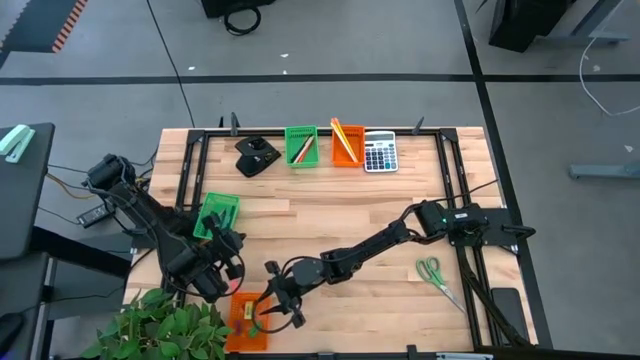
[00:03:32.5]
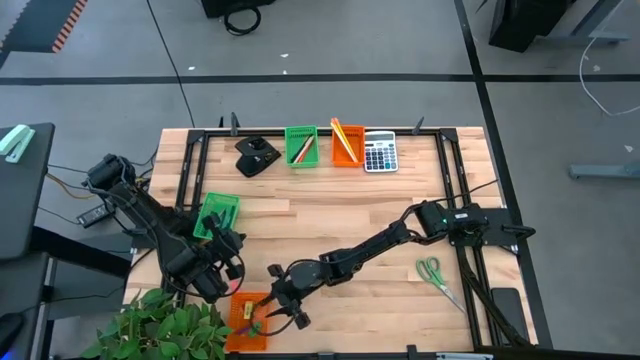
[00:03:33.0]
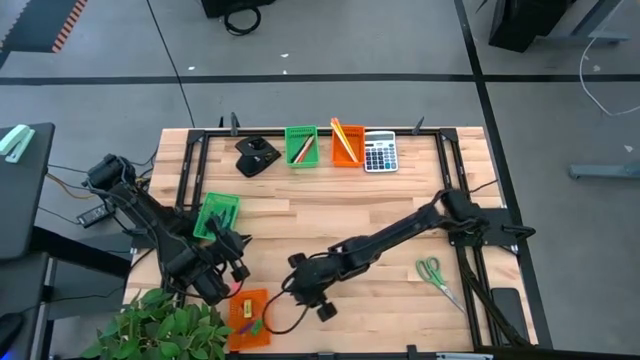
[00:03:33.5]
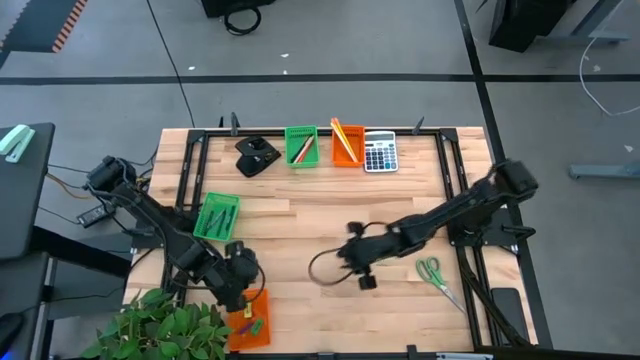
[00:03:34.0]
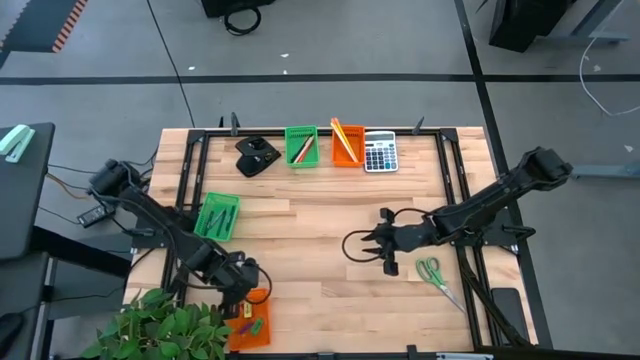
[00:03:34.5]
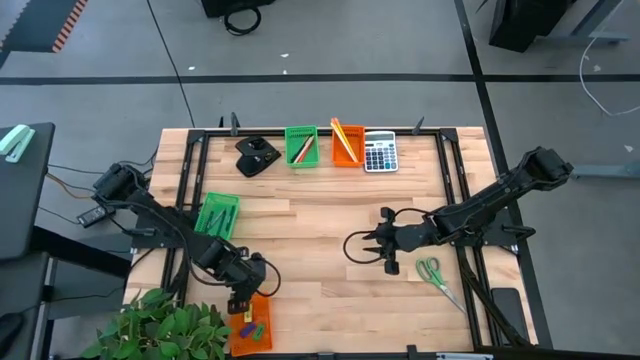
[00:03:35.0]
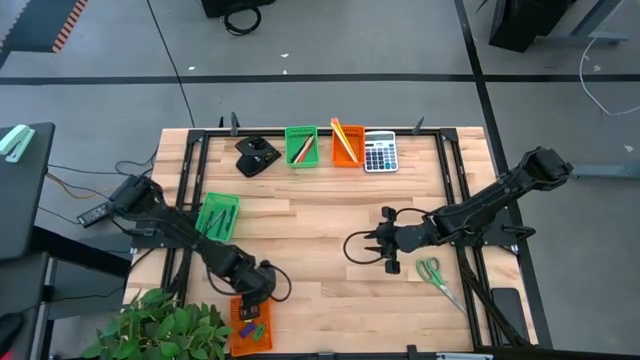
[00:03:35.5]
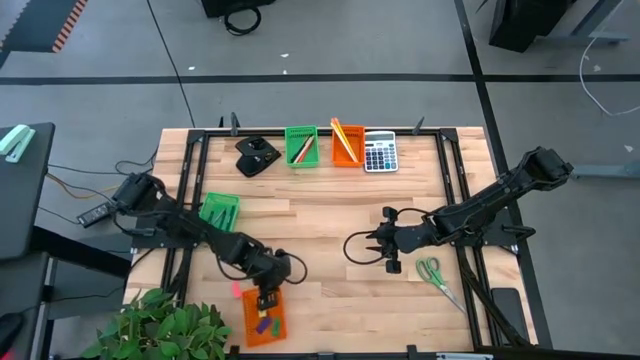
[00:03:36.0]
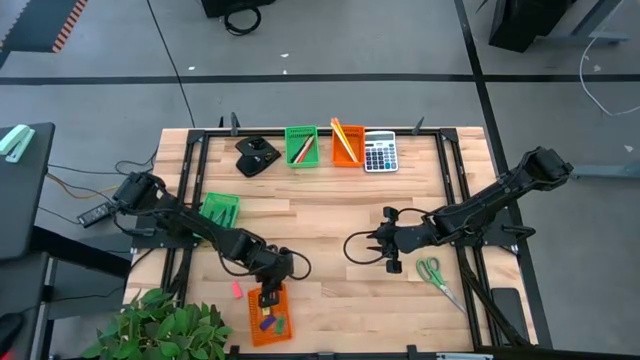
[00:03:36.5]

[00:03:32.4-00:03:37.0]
Task: Sort crayons/erasers/pens/pencils in bins
Adjust the bottom orange bin

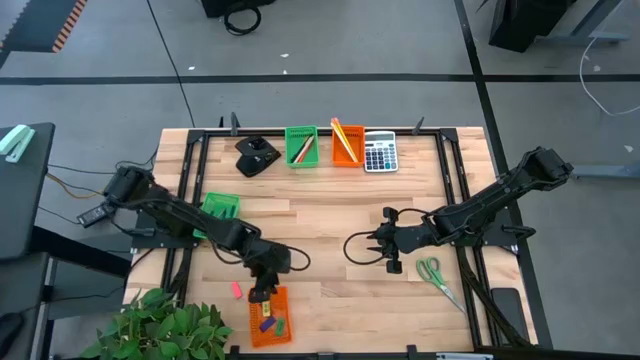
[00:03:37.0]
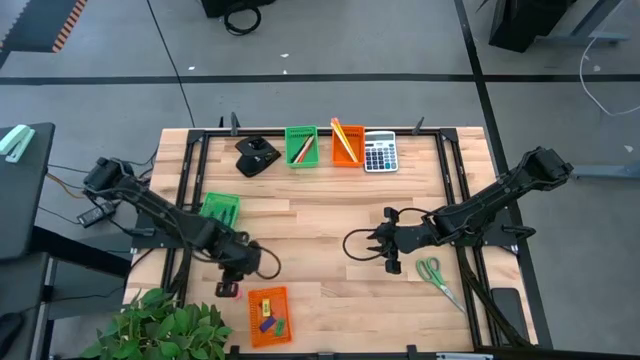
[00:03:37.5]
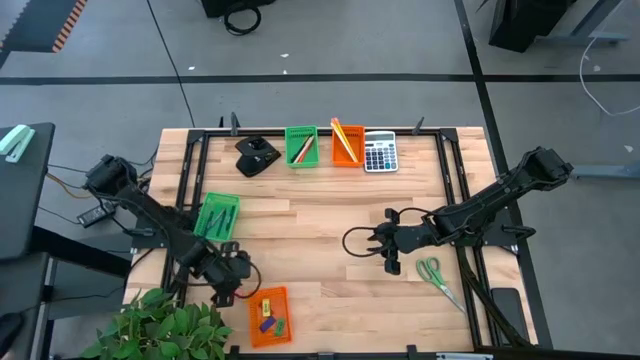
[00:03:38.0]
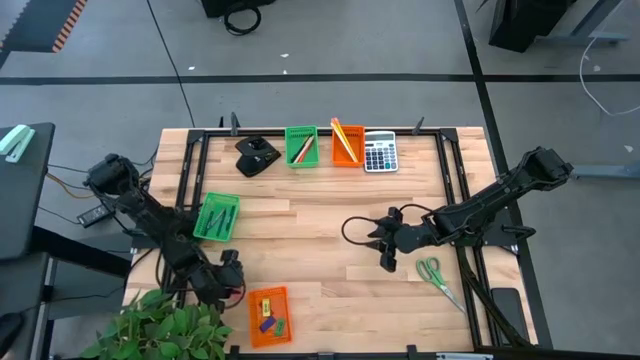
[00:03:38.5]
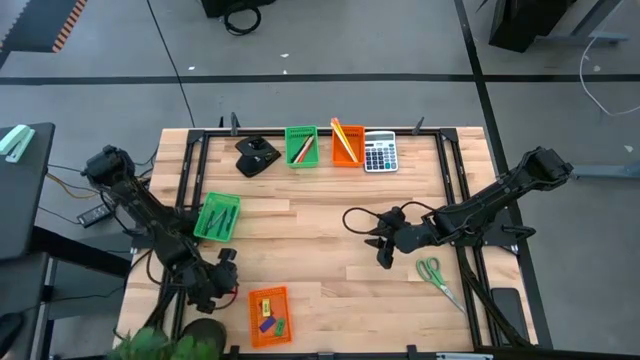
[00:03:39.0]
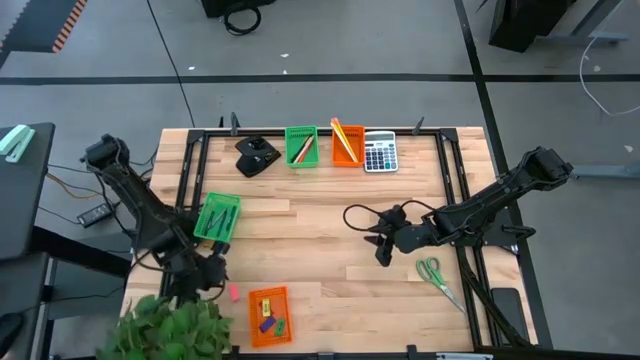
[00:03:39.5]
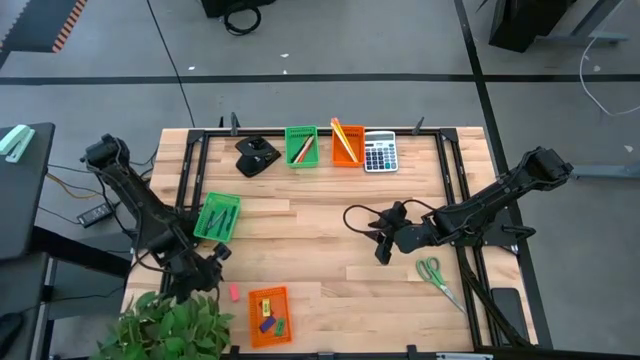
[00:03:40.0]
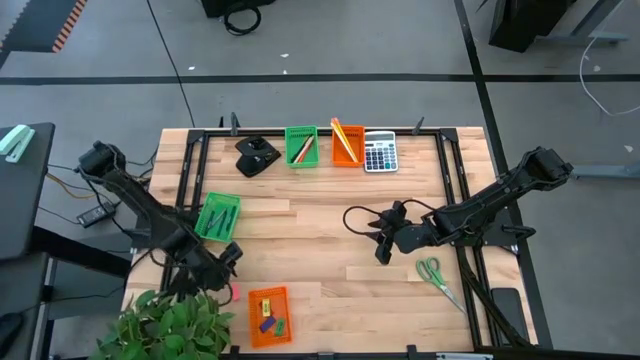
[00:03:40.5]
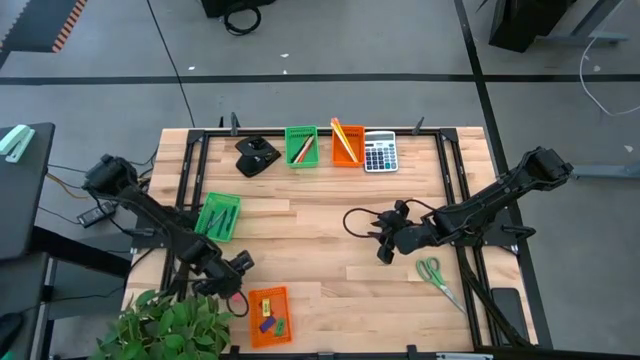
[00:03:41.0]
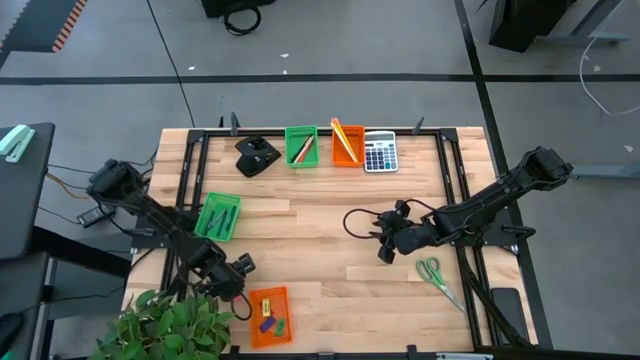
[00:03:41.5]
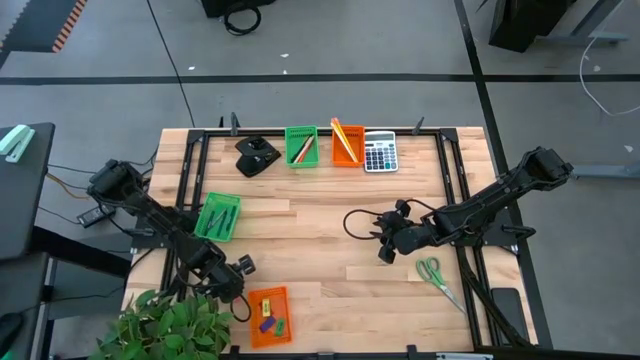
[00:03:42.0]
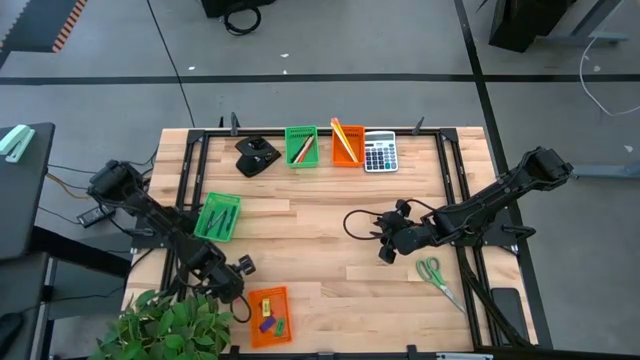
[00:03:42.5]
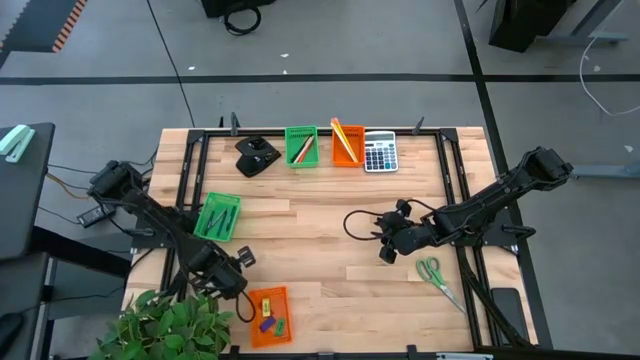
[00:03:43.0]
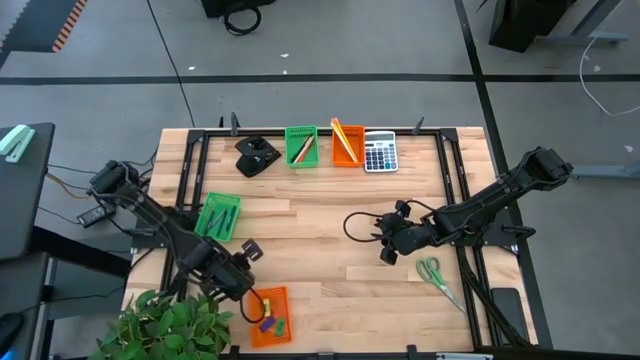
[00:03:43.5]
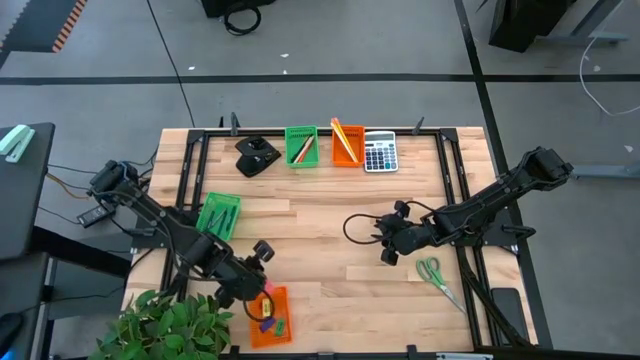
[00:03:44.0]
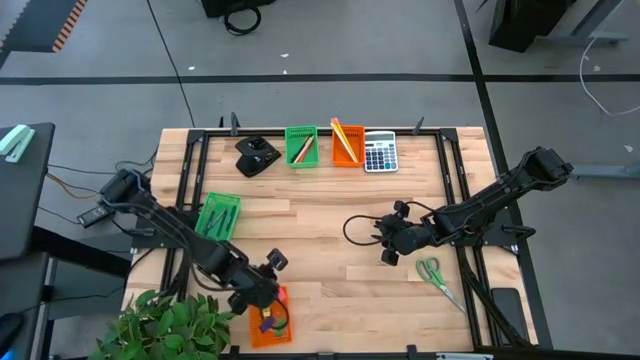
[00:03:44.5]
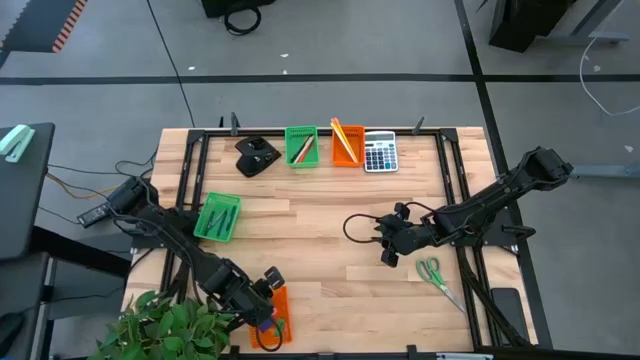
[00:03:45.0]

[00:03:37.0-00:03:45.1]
Put the pink eraser into the bottom orange bin

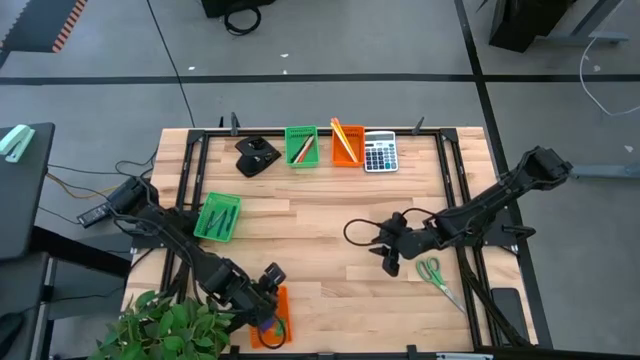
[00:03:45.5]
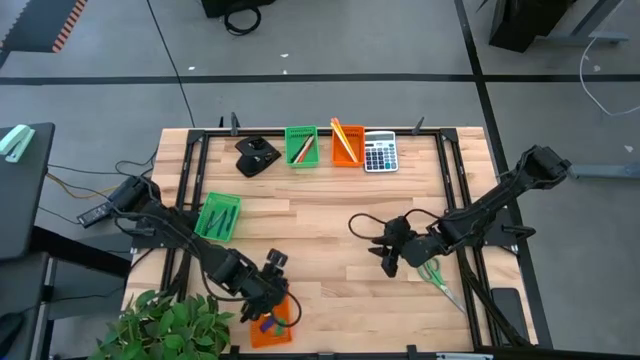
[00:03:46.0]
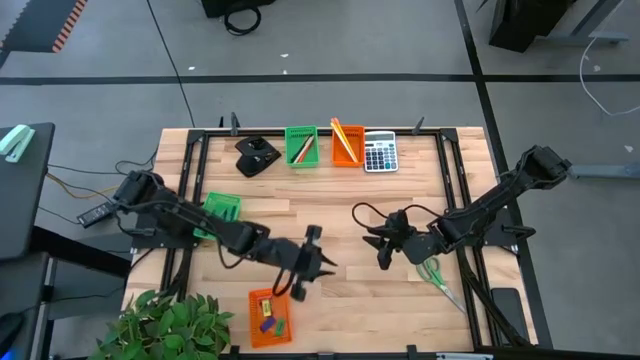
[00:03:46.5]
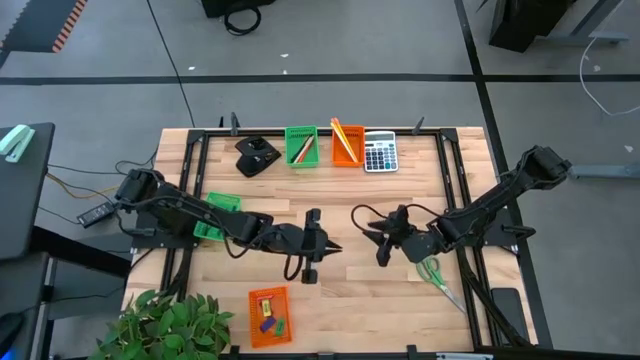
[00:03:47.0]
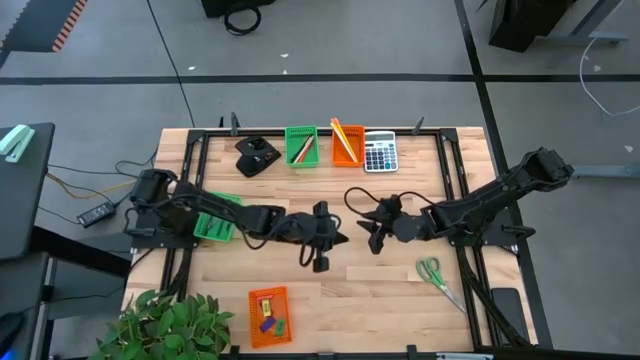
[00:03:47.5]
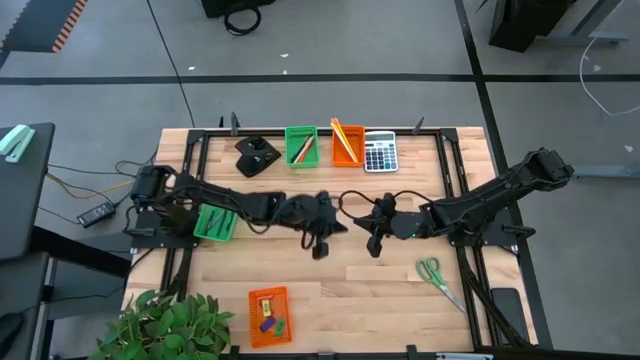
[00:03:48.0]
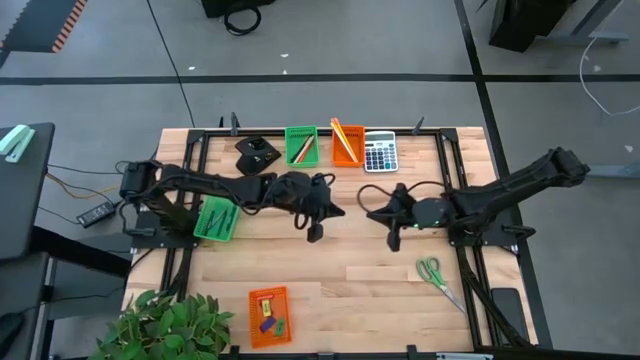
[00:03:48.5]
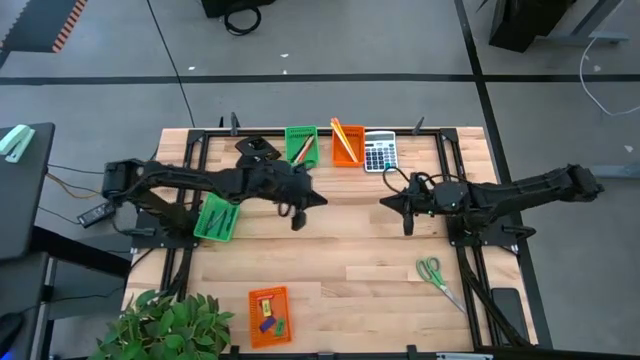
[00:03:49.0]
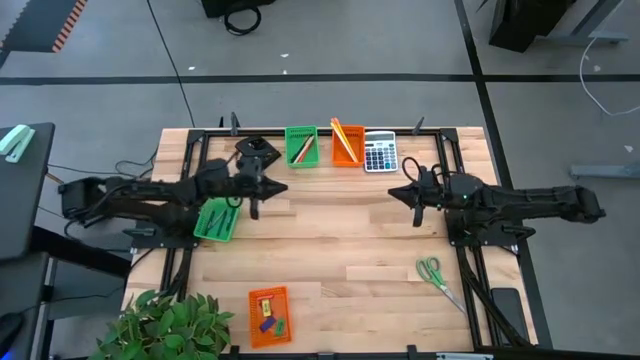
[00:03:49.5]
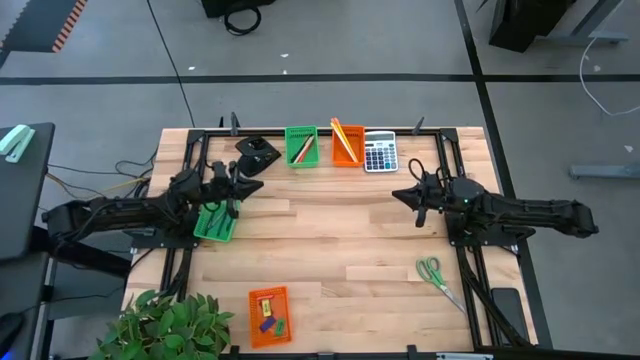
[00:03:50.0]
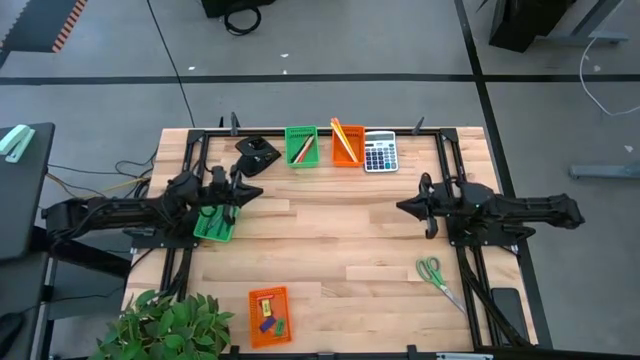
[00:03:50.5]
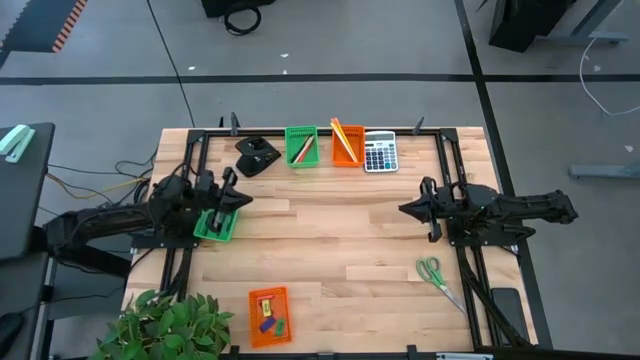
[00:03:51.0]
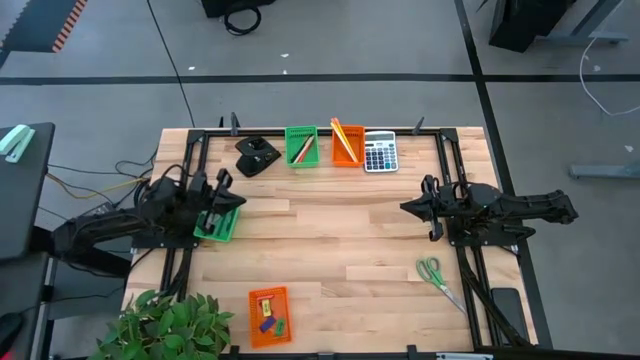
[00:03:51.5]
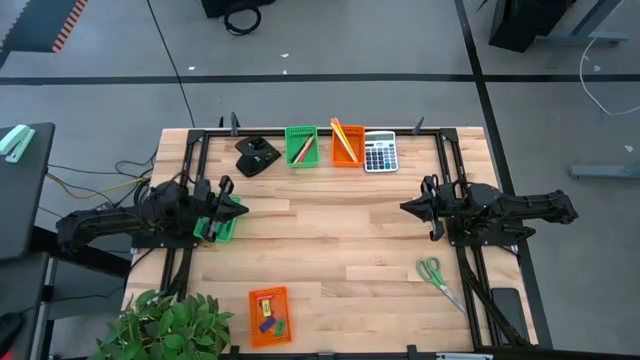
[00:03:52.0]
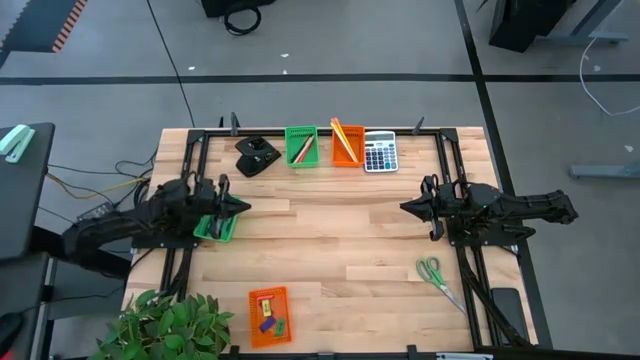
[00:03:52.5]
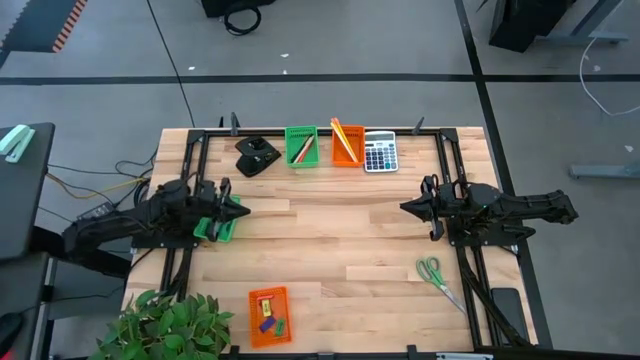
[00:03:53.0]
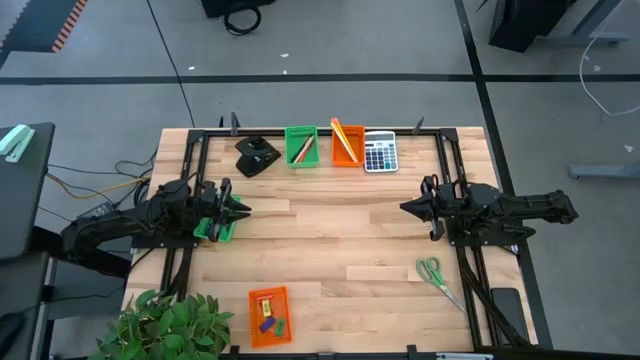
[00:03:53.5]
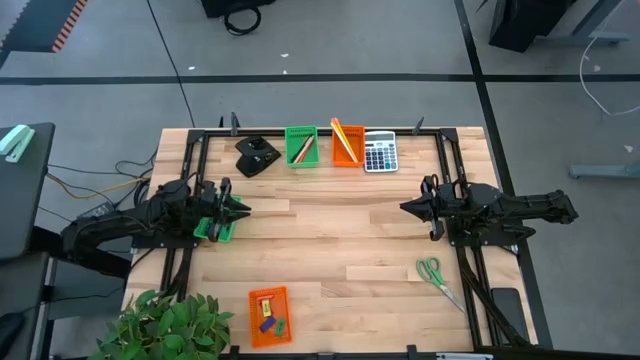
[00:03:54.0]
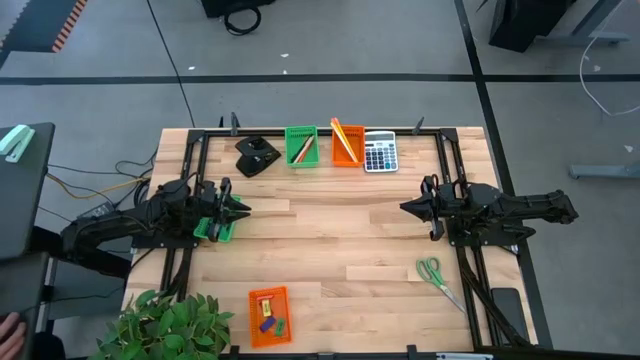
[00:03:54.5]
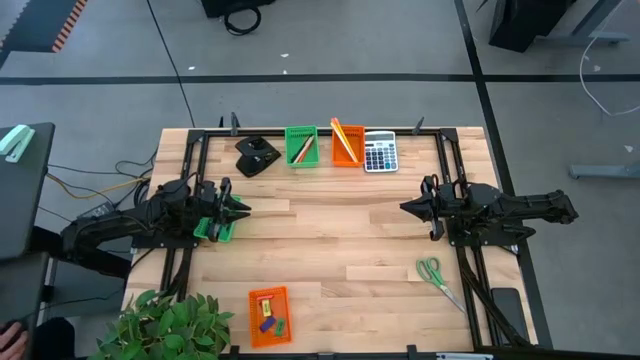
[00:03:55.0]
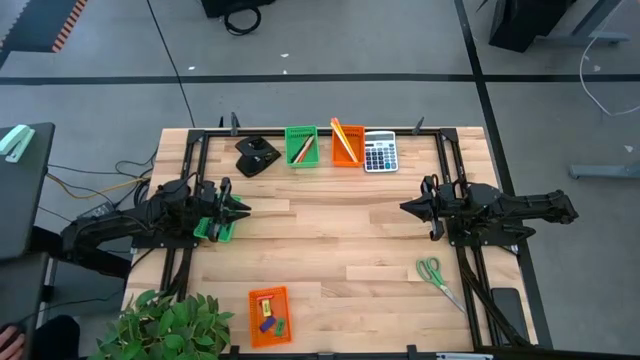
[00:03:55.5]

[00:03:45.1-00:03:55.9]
Return to Home Position
